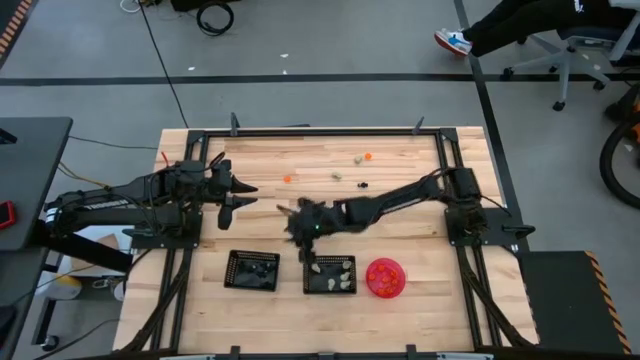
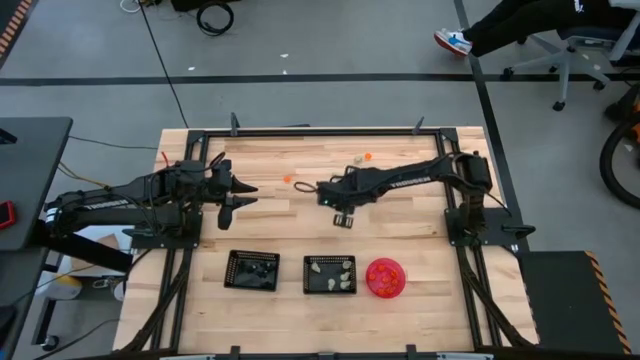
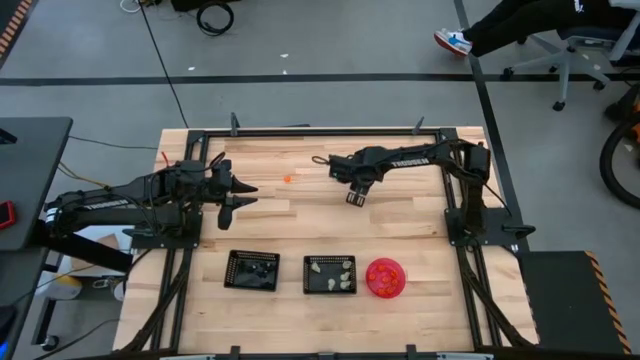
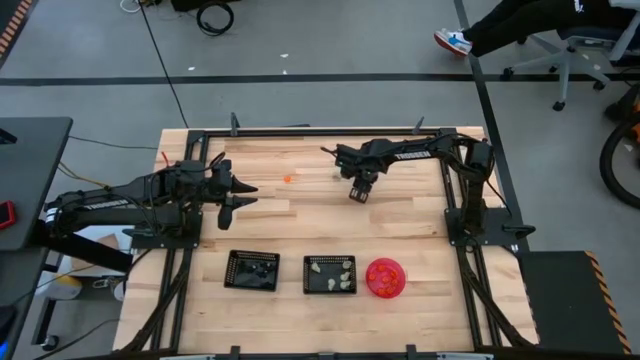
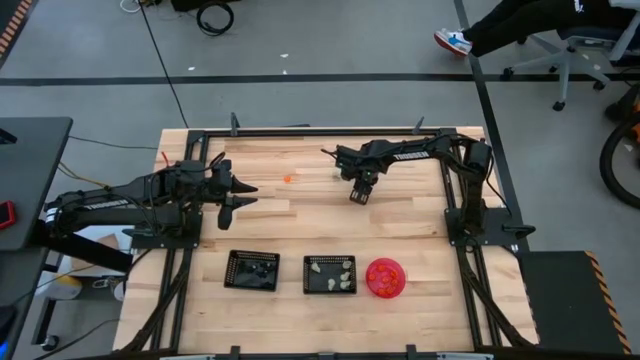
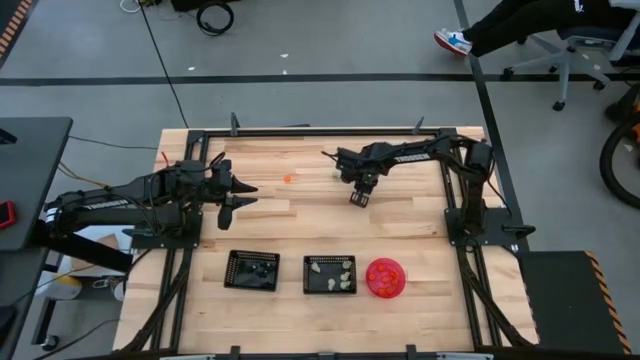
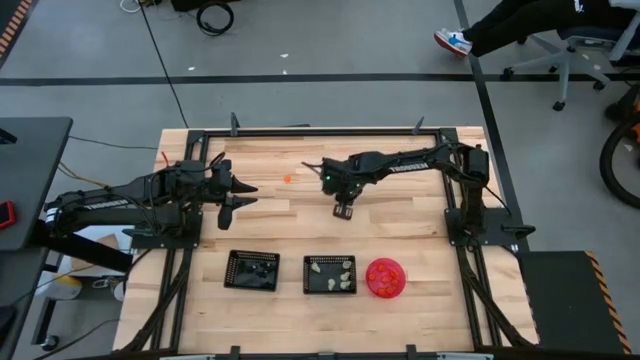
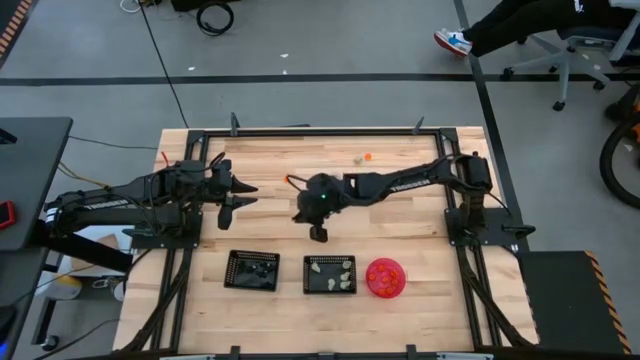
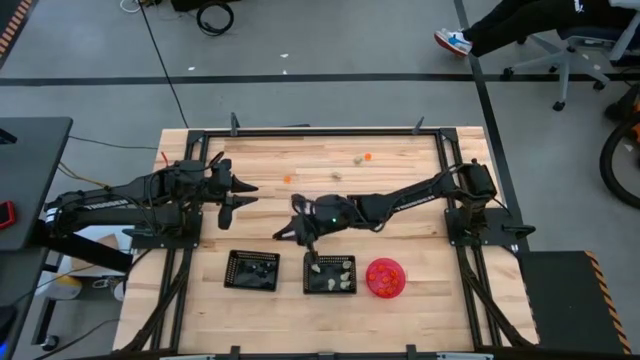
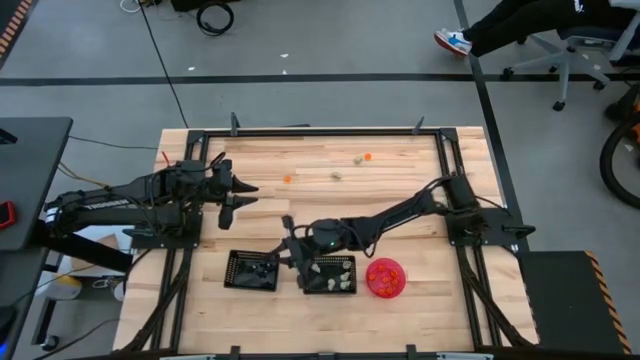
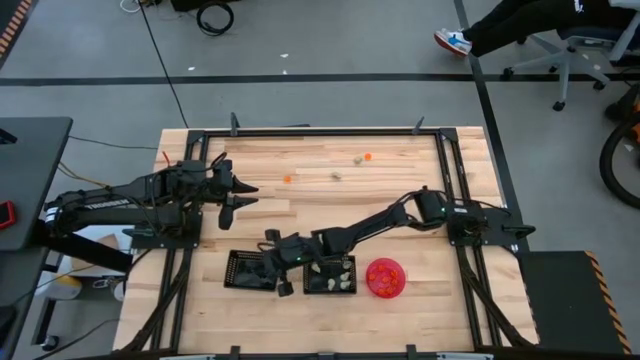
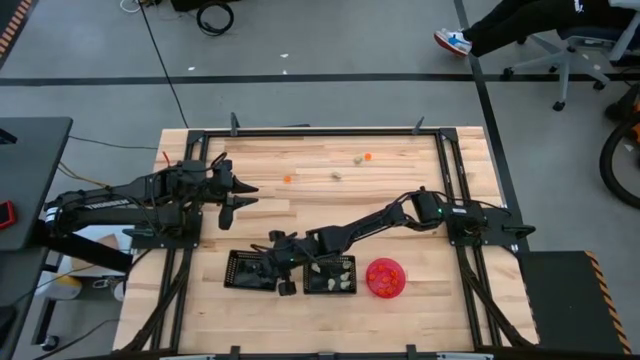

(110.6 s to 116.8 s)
Task: Sort Halloween decoration
Put the black skeleton toy into the left black bin

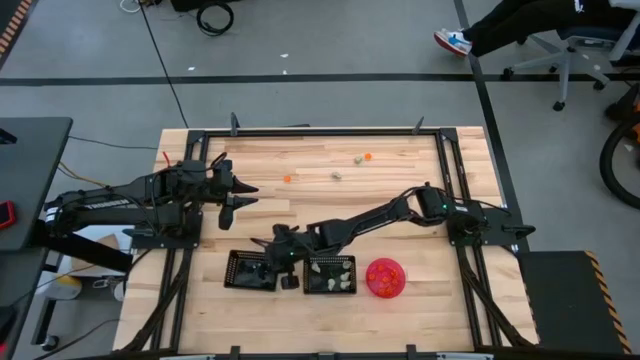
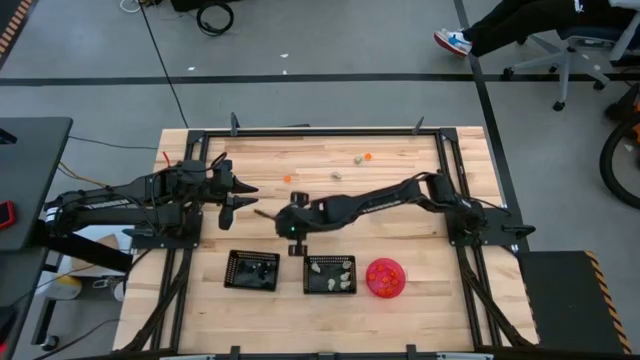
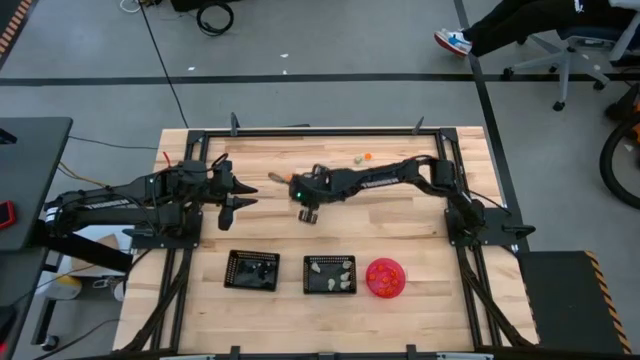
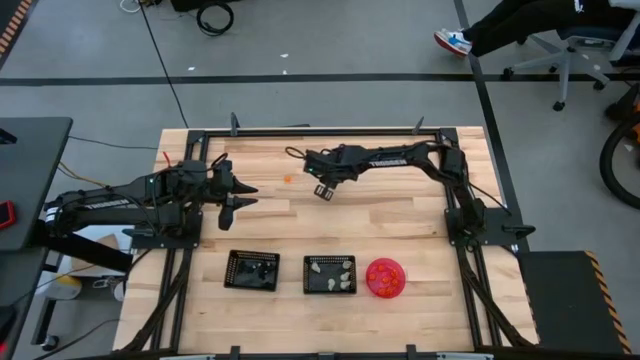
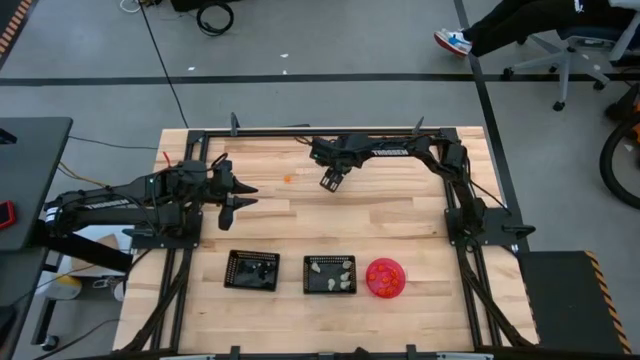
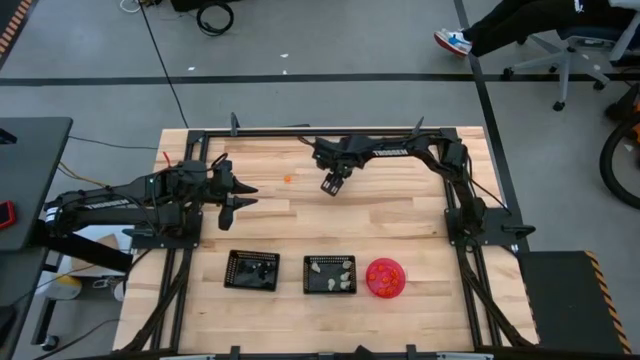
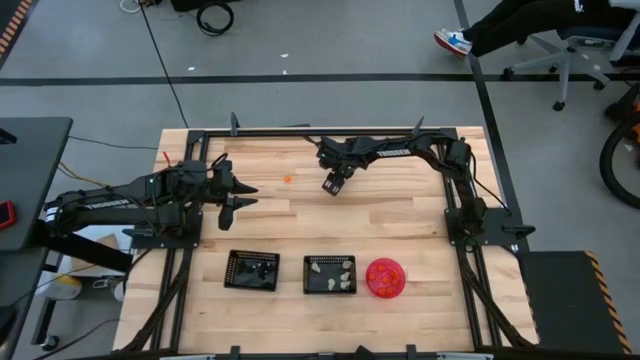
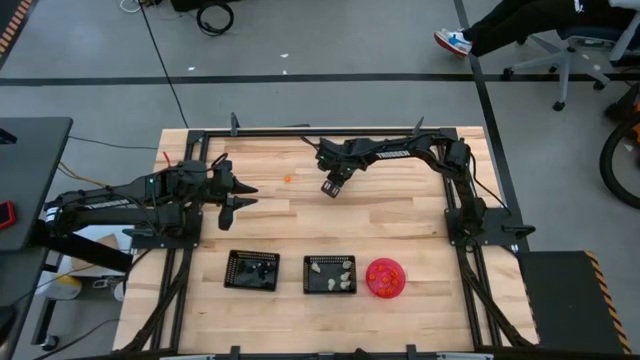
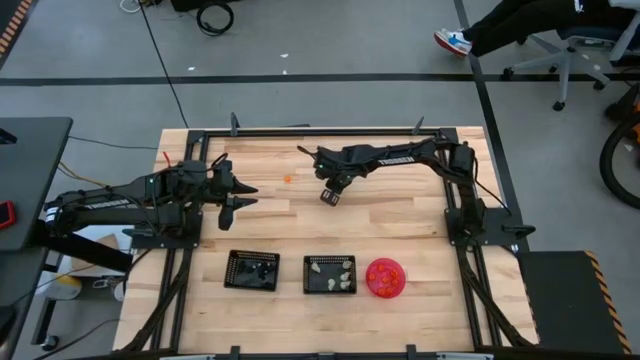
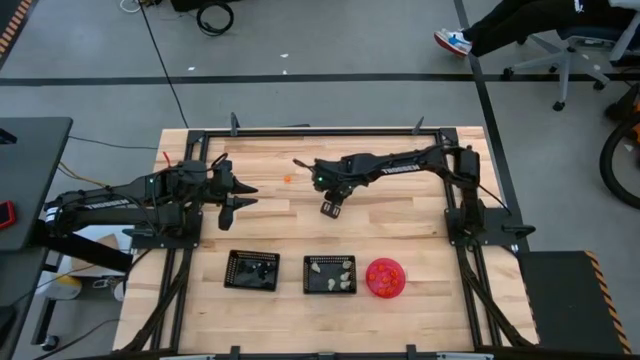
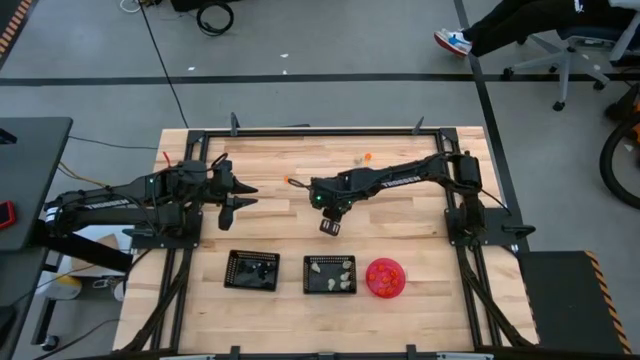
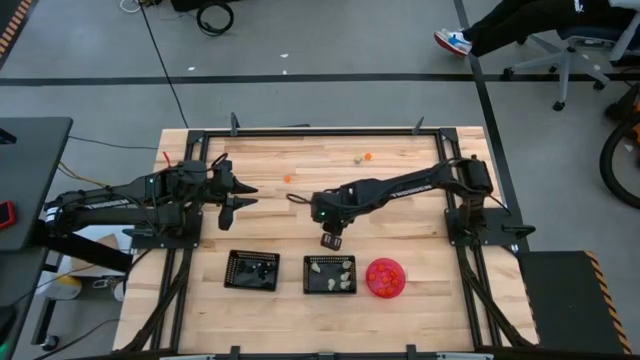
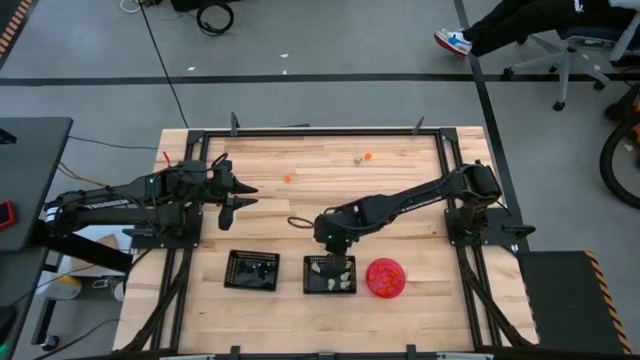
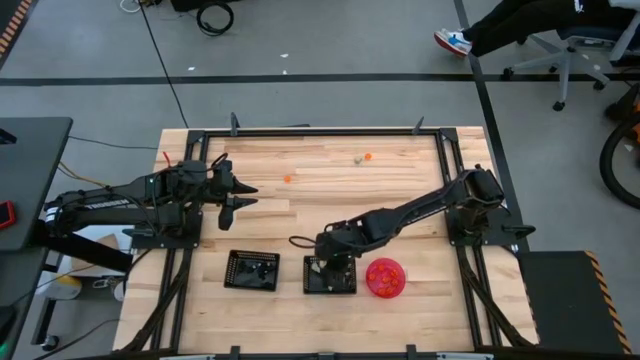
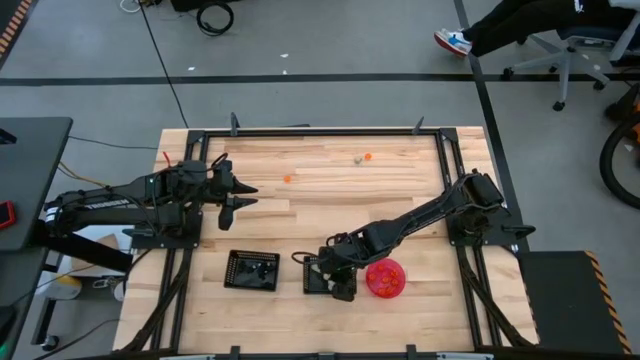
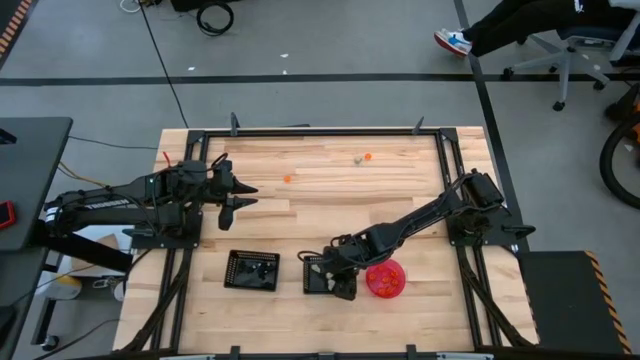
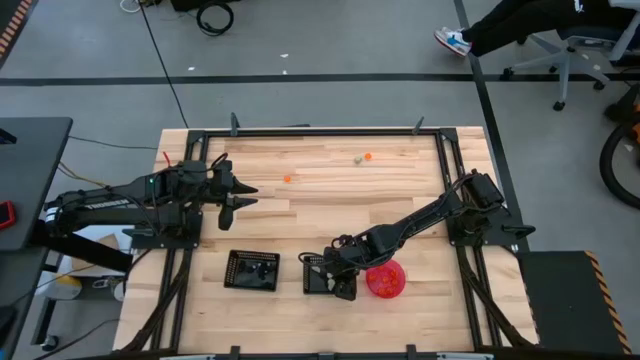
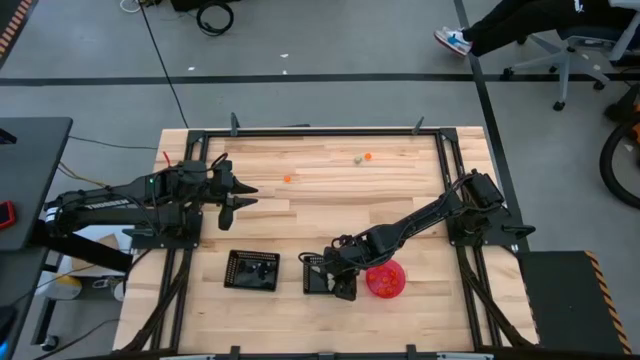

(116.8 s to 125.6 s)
Put the white skull toy into the right black bin

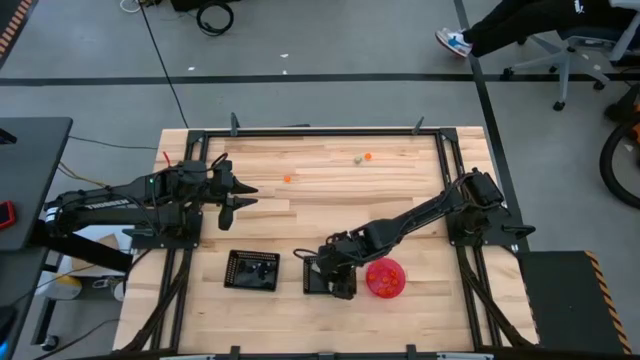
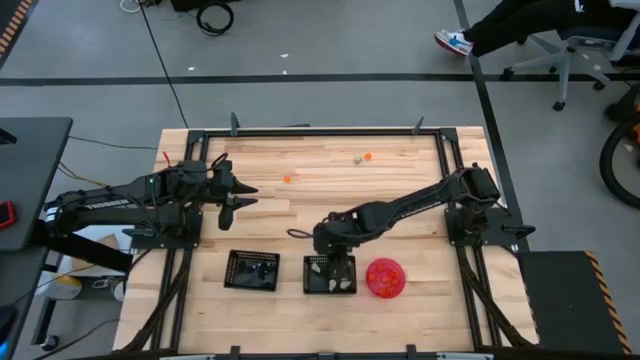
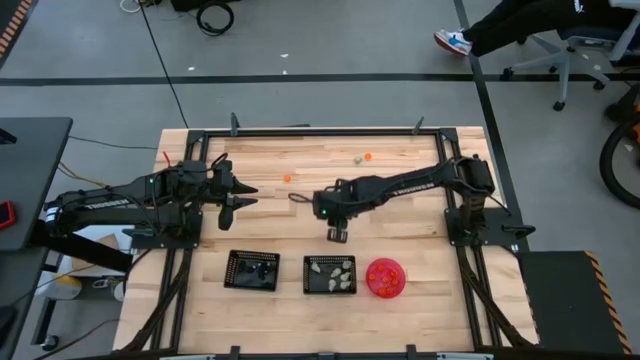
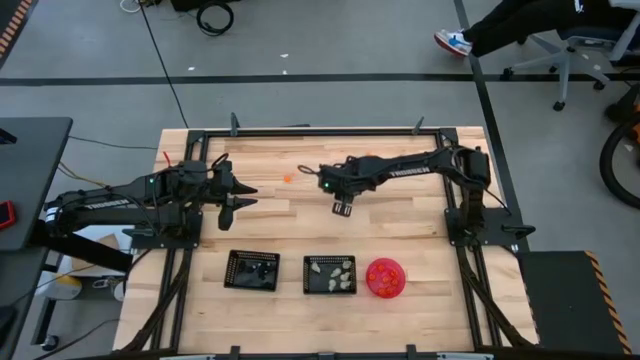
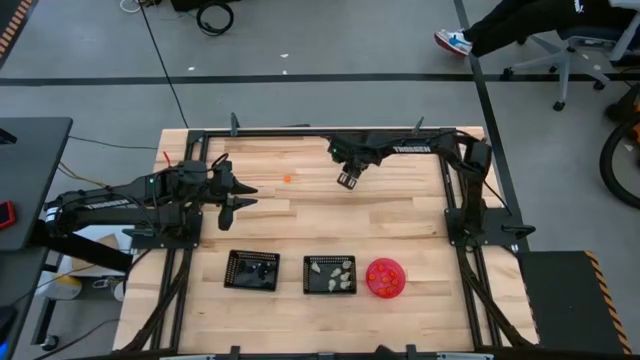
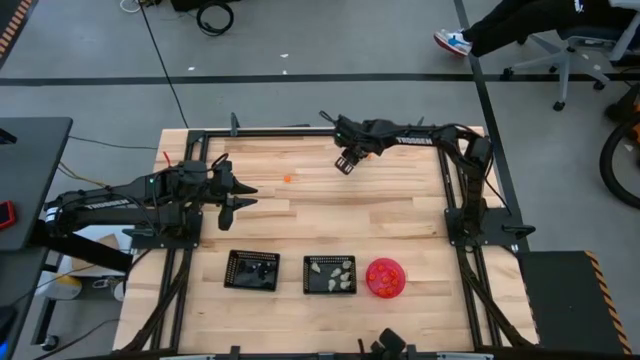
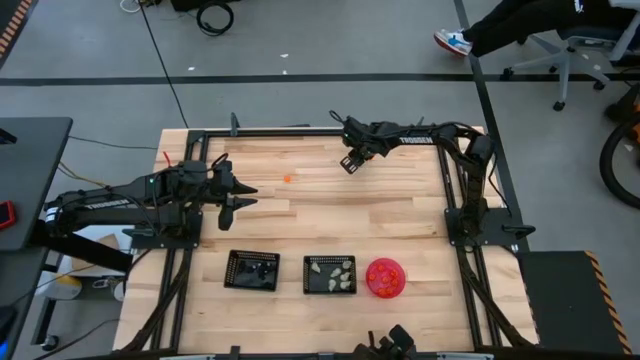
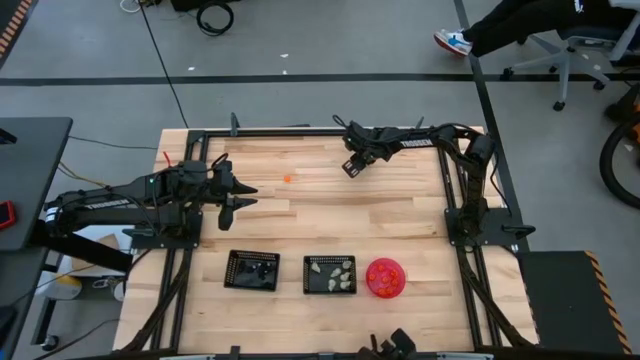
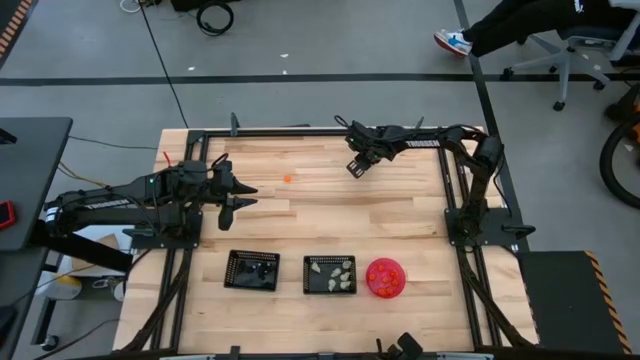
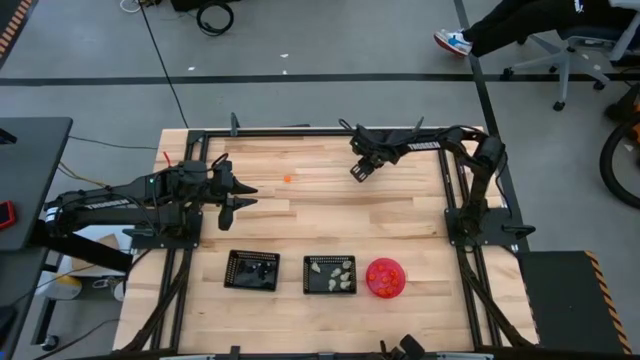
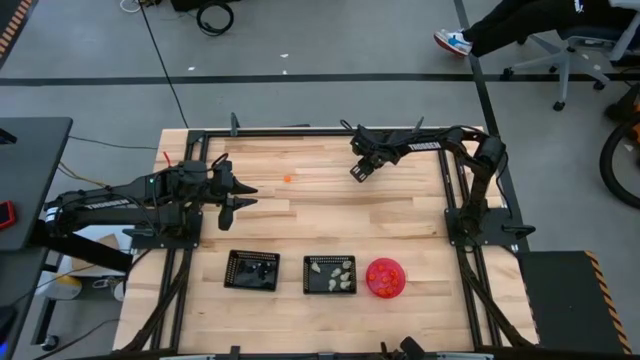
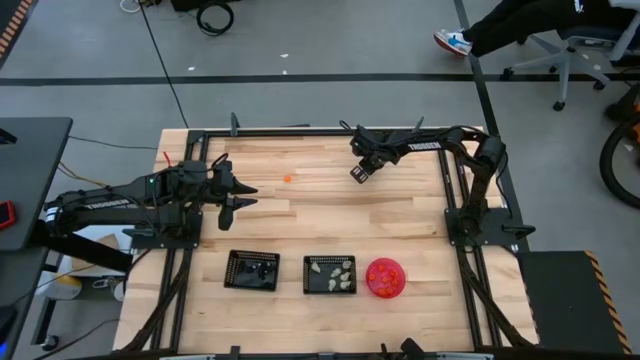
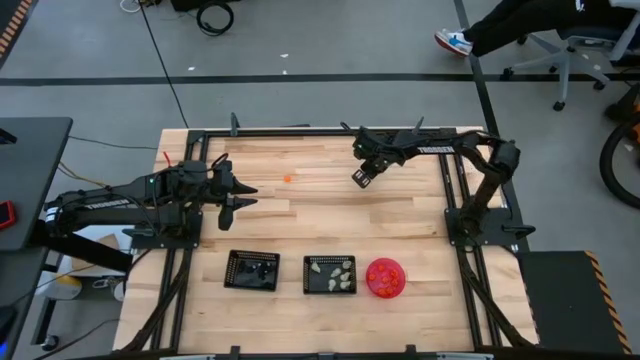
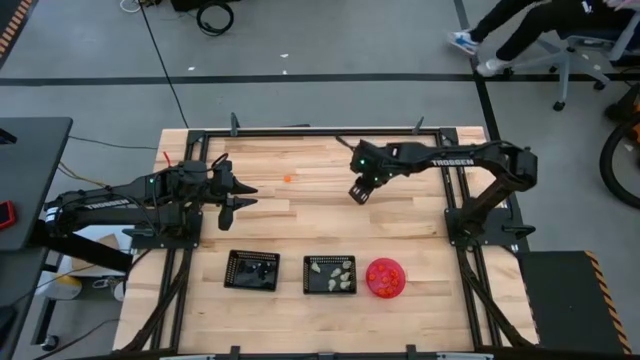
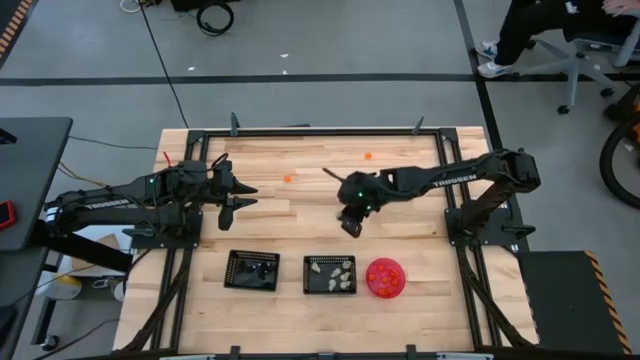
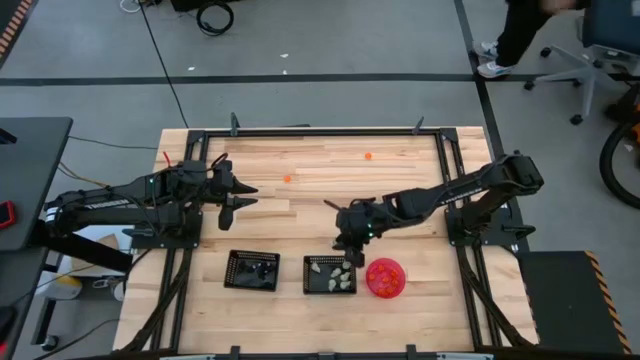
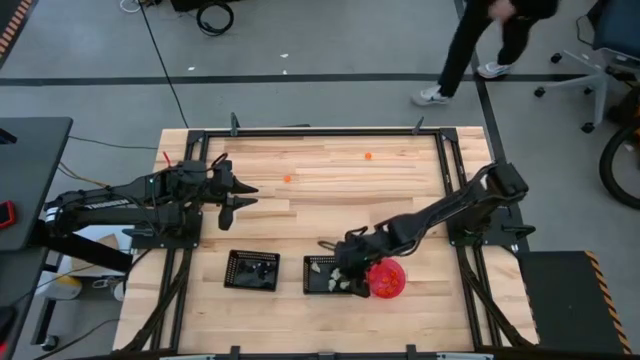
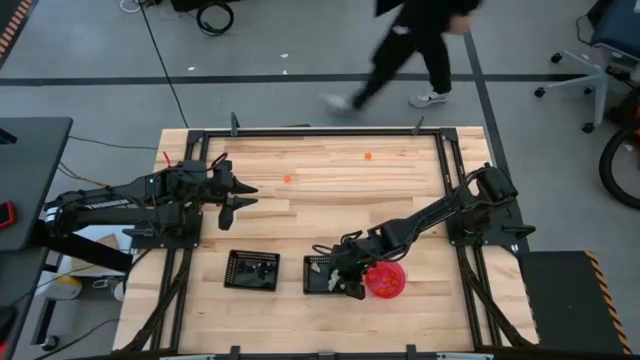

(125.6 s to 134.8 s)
Put the white skull toy into the right black bin
